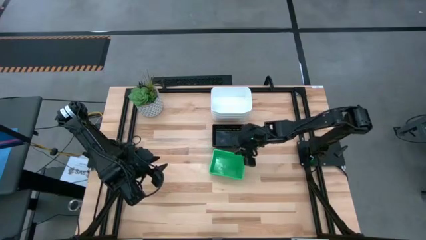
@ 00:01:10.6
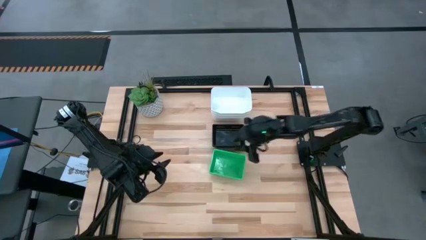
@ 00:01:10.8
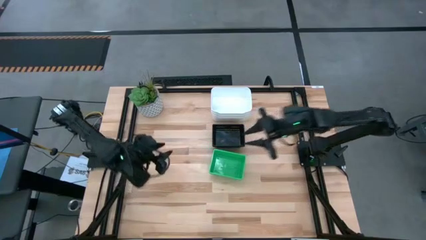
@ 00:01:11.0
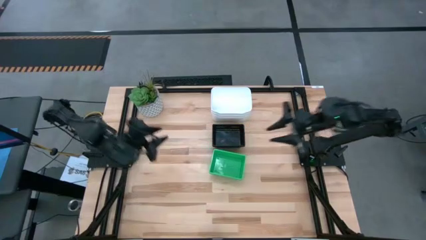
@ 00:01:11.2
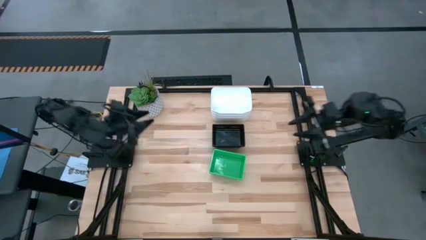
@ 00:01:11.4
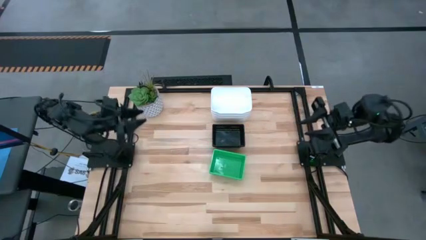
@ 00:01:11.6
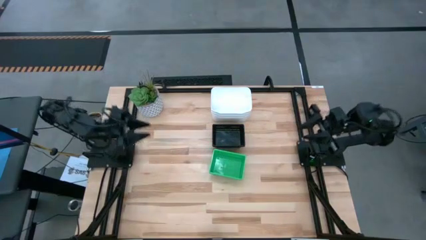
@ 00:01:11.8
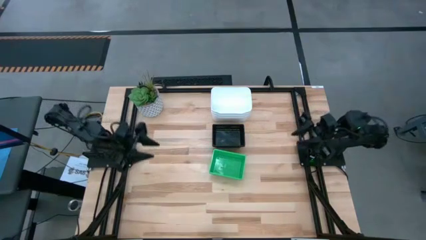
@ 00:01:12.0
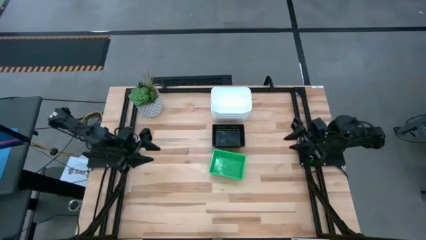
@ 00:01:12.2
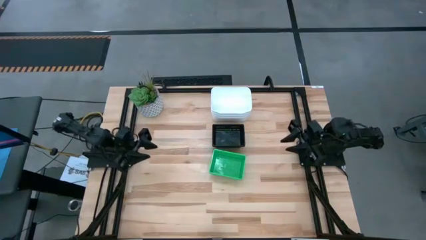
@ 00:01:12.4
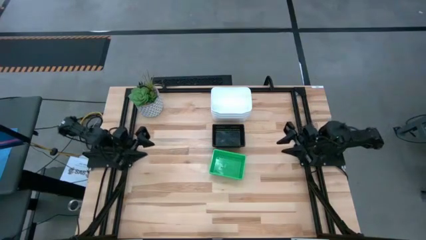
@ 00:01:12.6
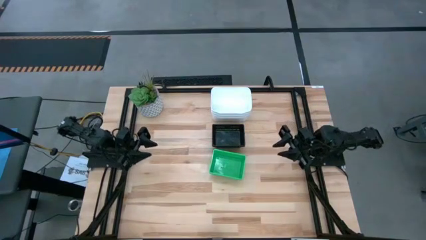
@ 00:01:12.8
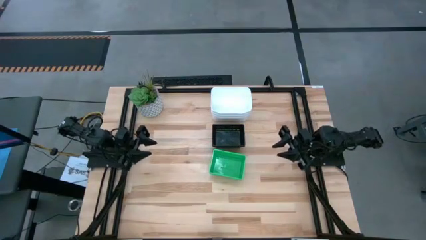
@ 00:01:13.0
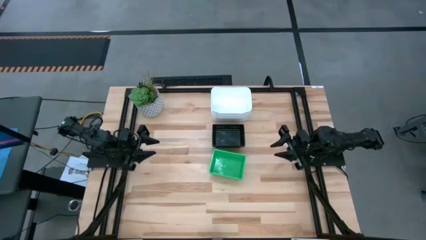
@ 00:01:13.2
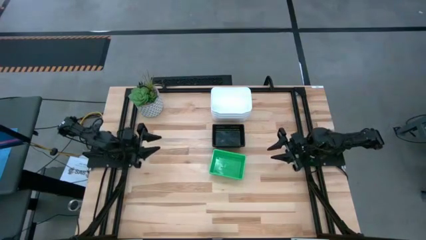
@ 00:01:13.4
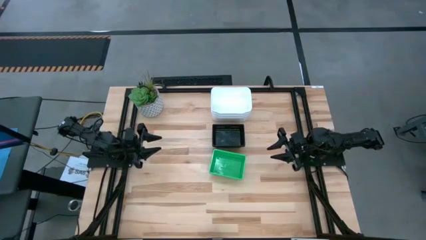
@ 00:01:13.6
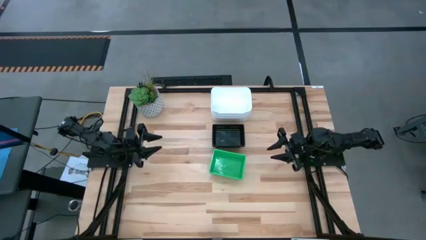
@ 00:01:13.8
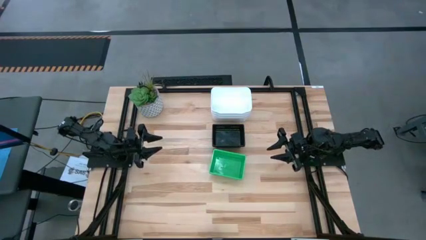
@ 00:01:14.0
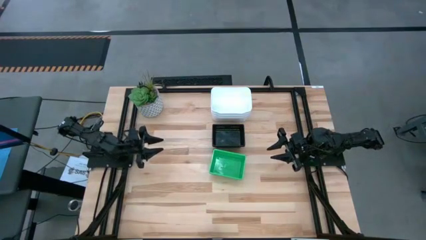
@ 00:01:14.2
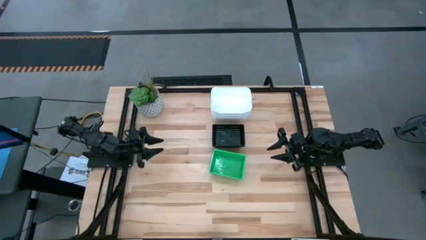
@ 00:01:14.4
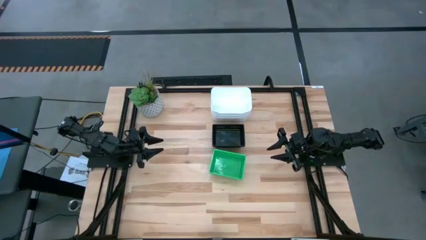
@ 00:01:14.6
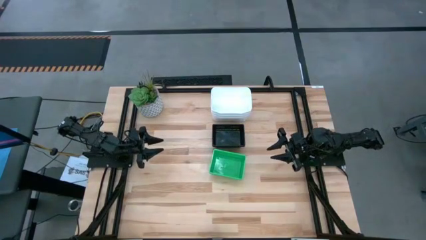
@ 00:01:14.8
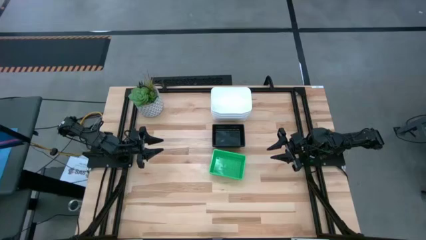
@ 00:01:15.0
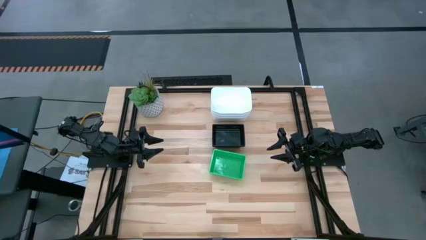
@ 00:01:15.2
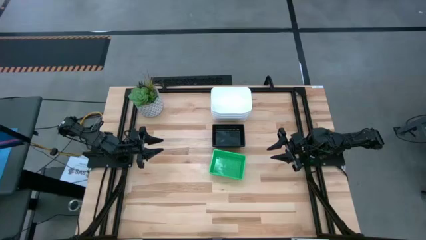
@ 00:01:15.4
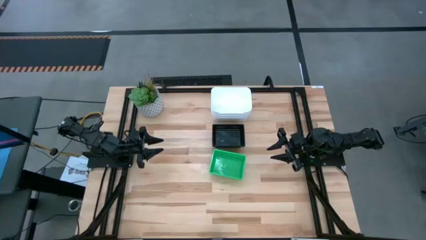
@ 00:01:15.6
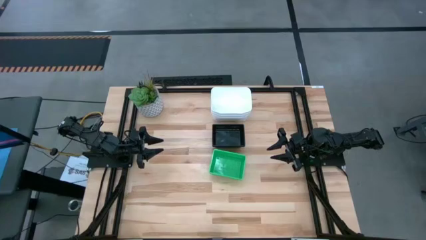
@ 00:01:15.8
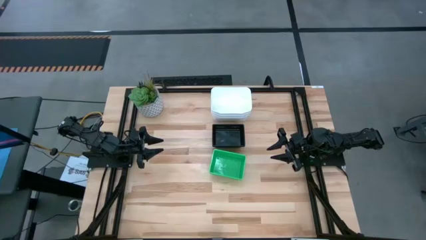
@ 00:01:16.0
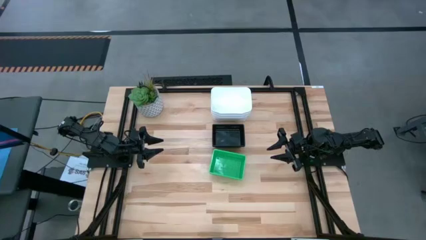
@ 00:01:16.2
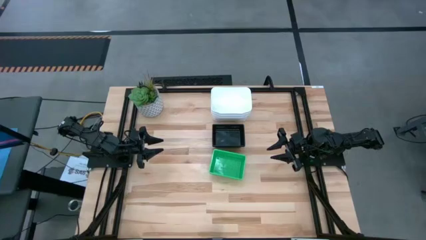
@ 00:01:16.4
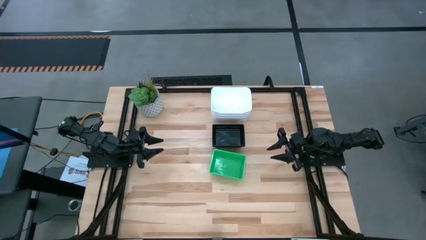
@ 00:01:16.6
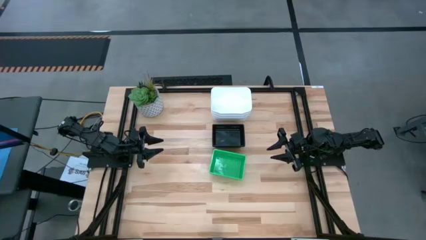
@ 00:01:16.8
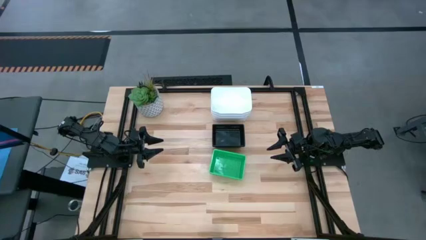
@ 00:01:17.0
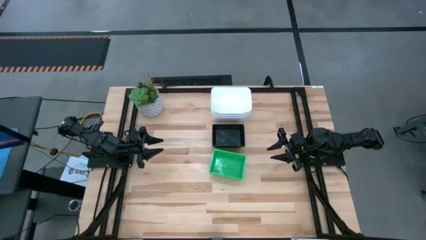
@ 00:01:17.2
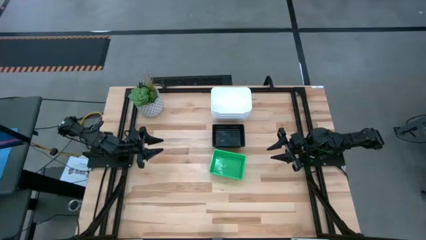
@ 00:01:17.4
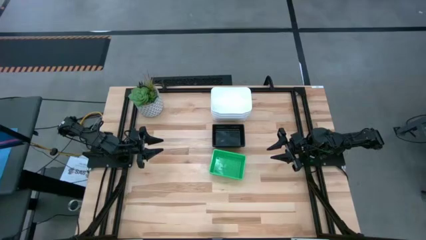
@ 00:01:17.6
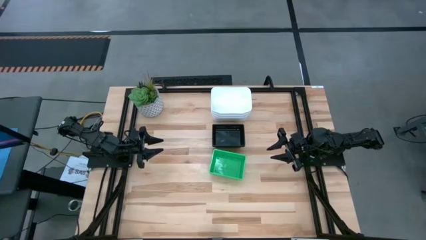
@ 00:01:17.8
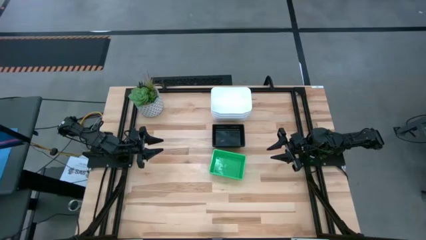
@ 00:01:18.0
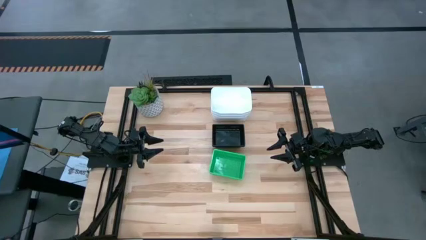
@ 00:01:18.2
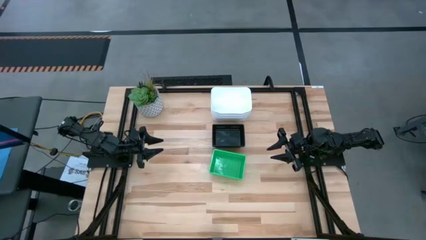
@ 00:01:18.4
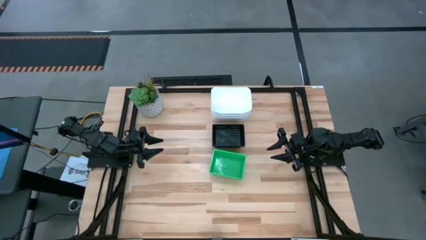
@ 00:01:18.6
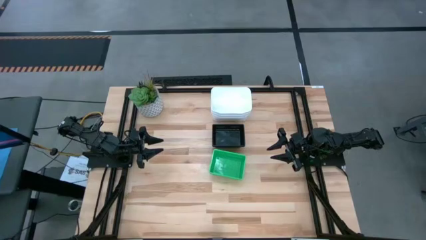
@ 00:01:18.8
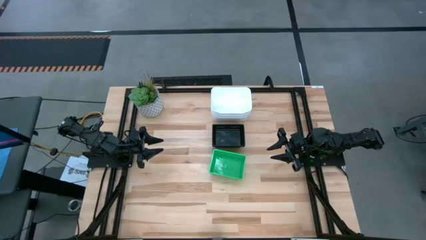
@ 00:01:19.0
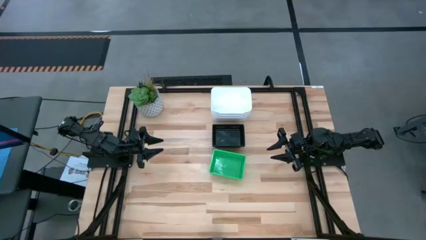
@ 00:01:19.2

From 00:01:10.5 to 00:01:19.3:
Return to Home Position

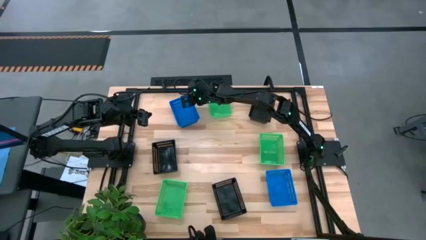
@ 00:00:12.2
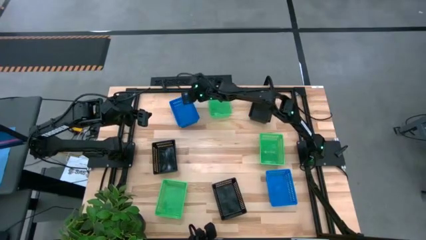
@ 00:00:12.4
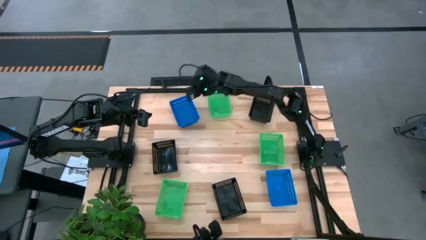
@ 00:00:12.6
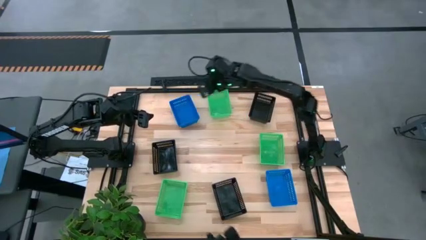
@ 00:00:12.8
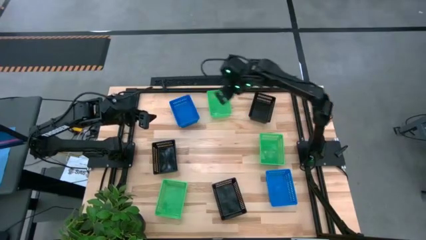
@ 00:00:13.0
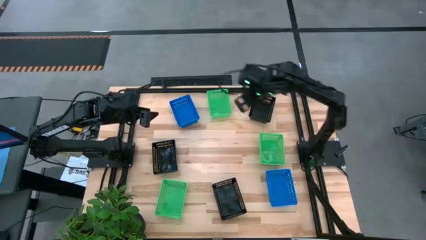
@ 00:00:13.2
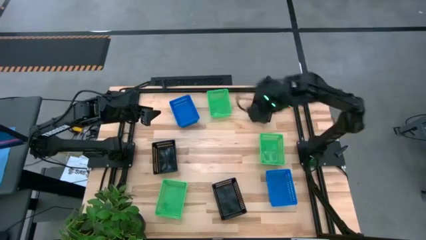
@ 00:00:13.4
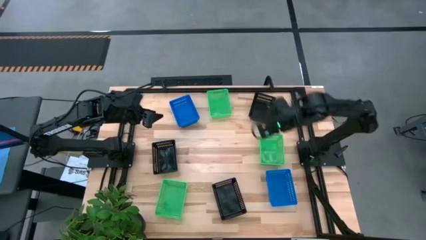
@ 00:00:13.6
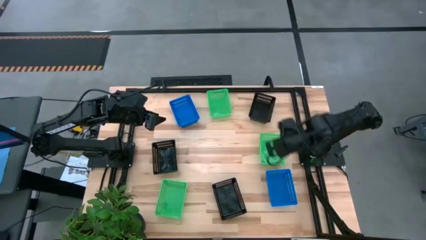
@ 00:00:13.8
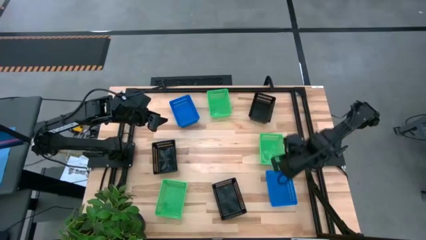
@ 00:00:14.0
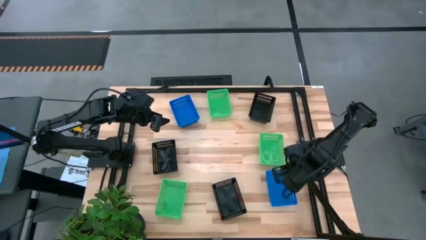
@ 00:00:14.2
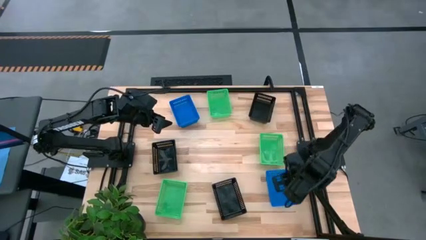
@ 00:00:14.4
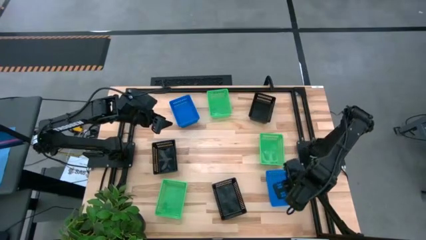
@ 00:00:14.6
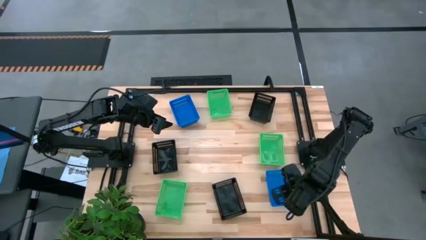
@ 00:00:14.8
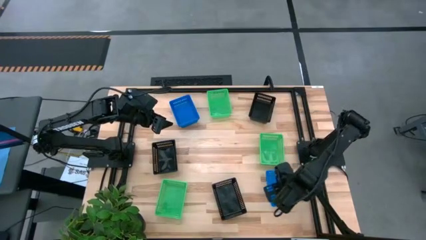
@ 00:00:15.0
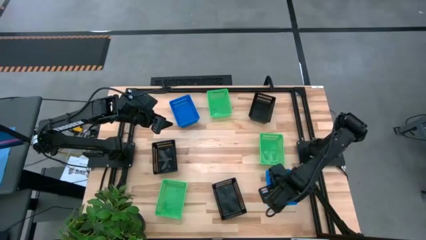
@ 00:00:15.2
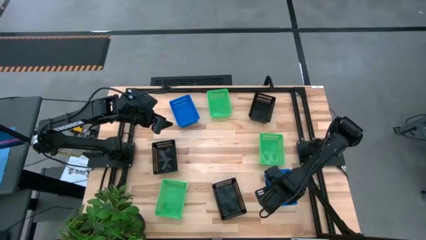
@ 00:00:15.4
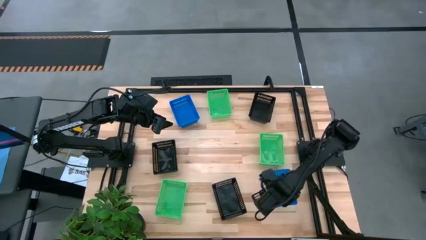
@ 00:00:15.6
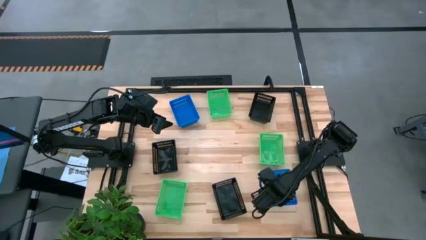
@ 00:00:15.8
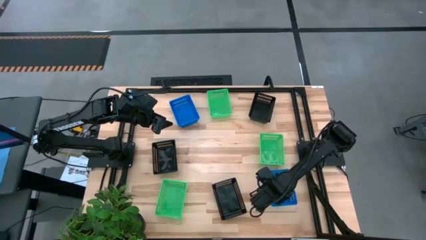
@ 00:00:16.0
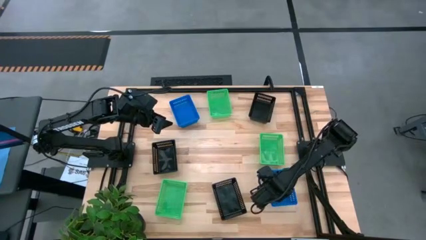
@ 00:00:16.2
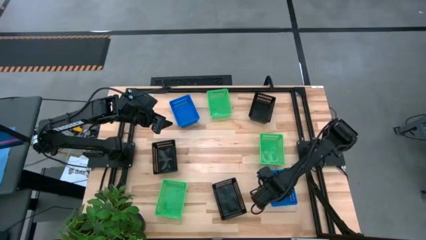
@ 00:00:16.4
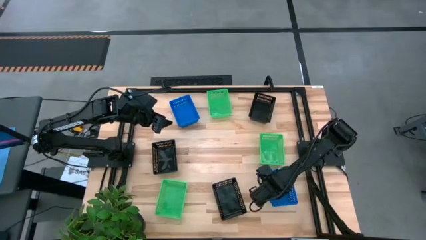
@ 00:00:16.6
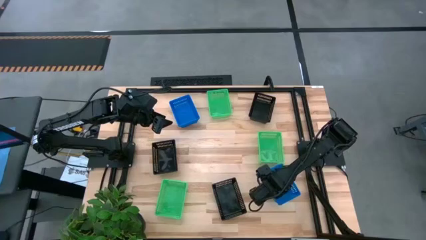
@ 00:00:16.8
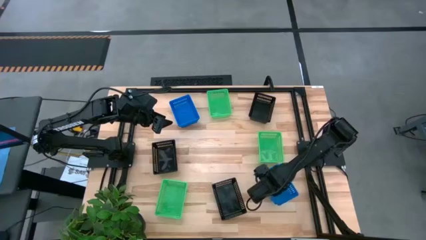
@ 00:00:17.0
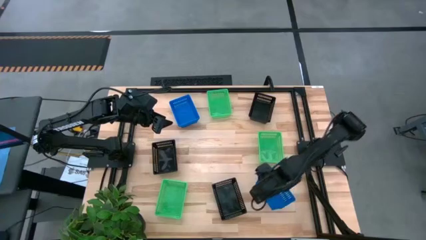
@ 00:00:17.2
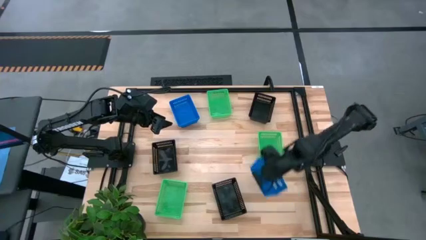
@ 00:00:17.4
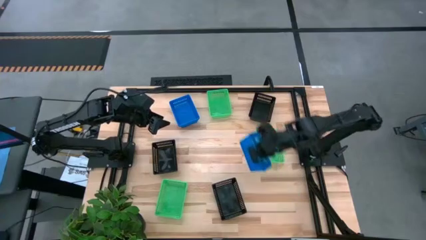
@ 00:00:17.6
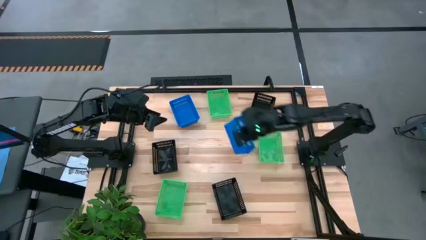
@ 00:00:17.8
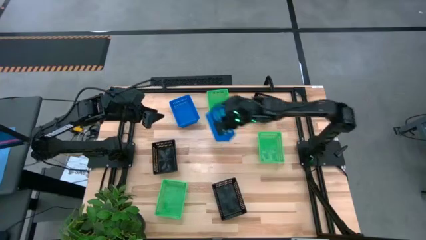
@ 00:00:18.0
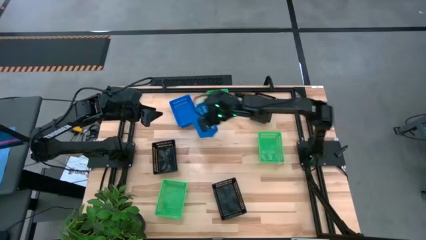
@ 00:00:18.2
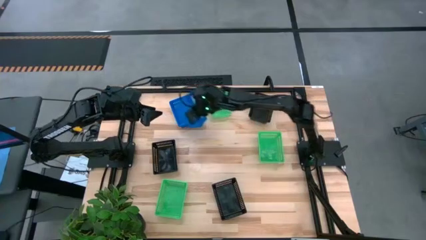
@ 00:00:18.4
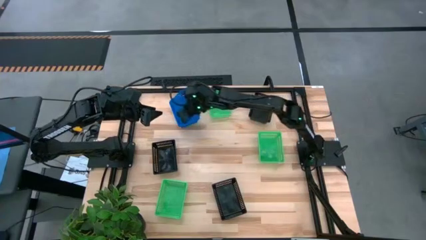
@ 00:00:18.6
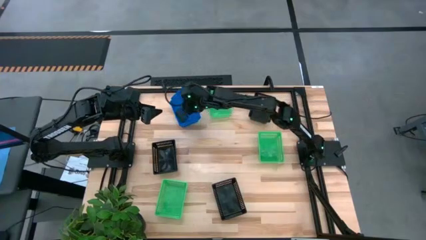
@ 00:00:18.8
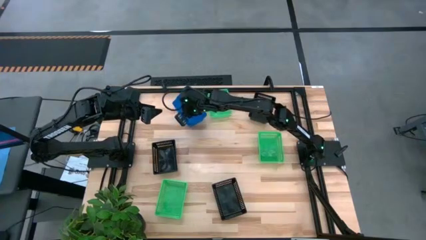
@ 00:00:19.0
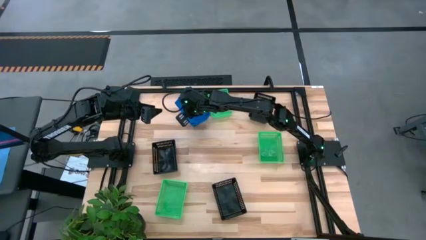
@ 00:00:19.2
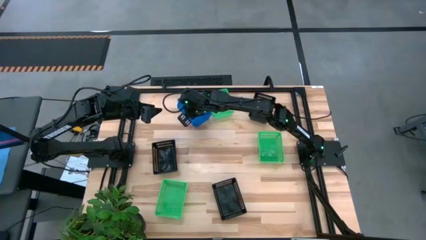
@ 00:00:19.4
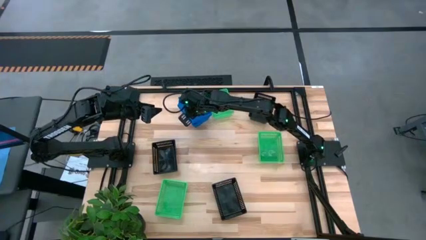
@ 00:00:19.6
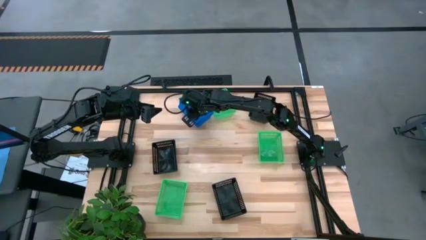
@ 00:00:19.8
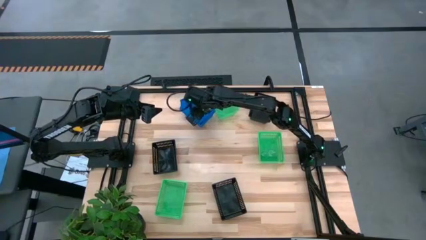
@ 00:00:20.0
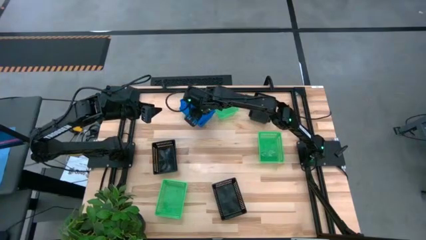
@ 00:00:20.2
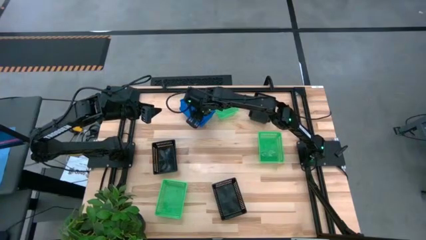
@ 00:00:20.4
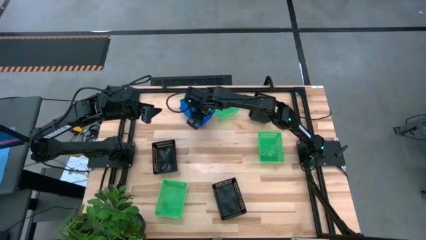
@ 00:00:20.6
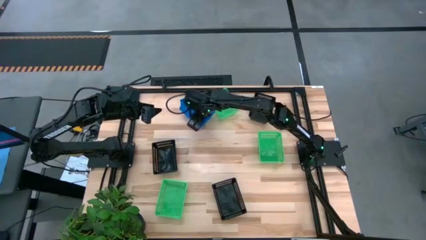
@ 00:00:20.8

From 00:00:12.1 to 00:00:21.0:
Stack the bottom blue bin on the blue bins
